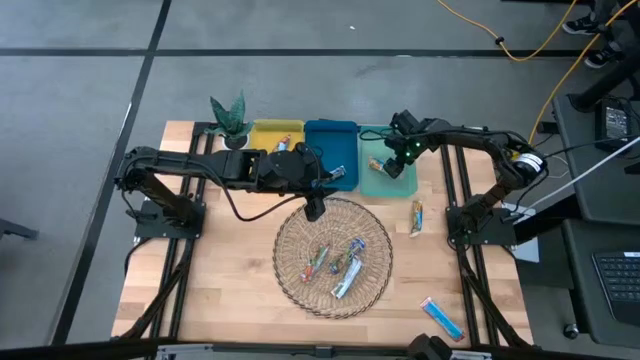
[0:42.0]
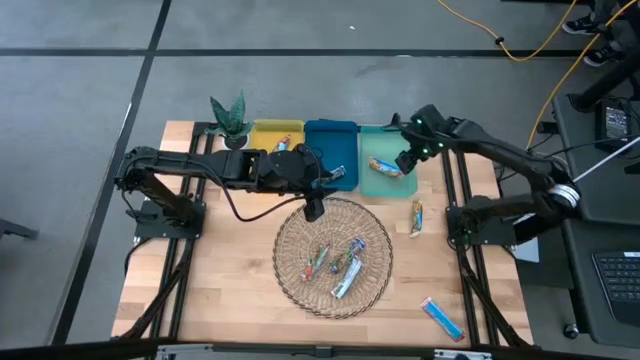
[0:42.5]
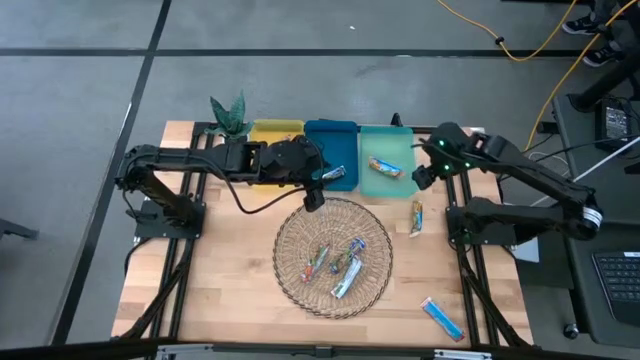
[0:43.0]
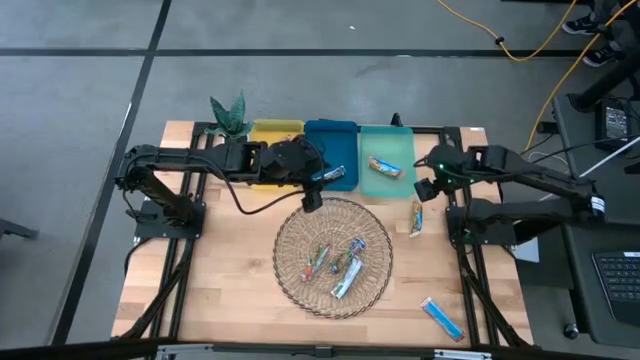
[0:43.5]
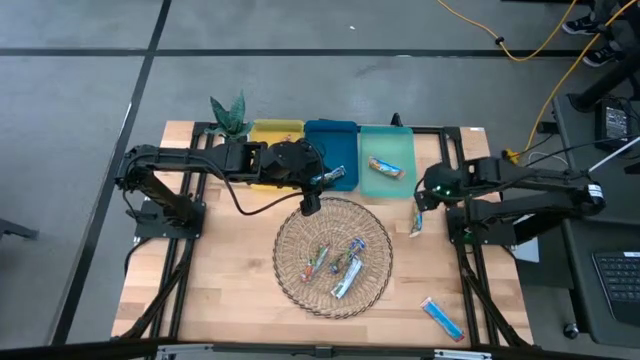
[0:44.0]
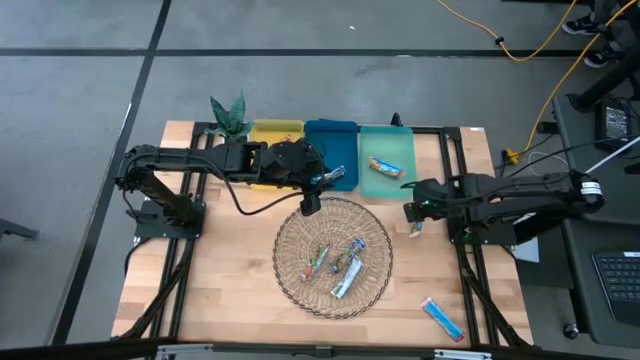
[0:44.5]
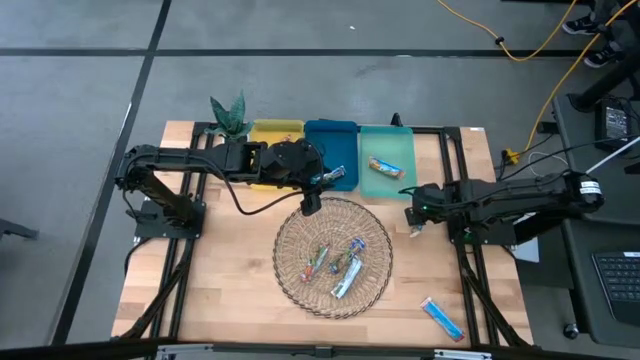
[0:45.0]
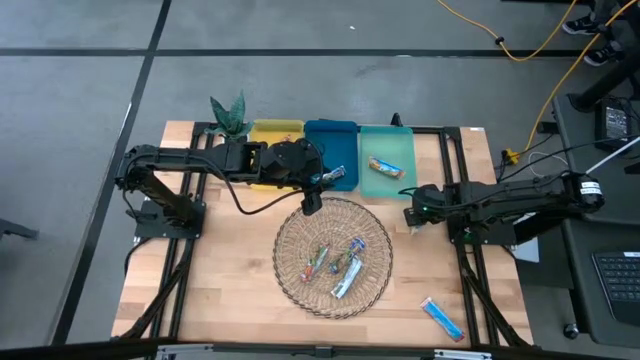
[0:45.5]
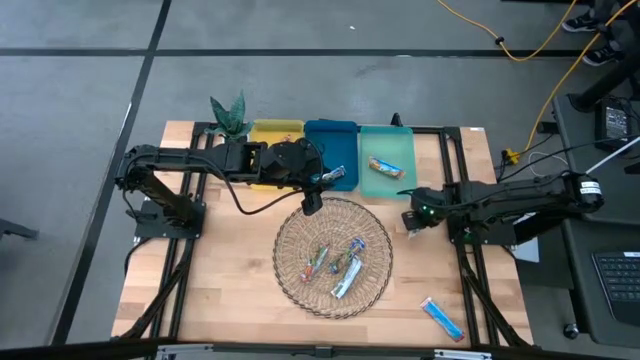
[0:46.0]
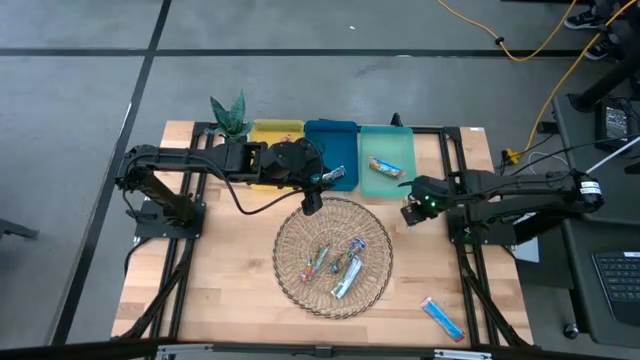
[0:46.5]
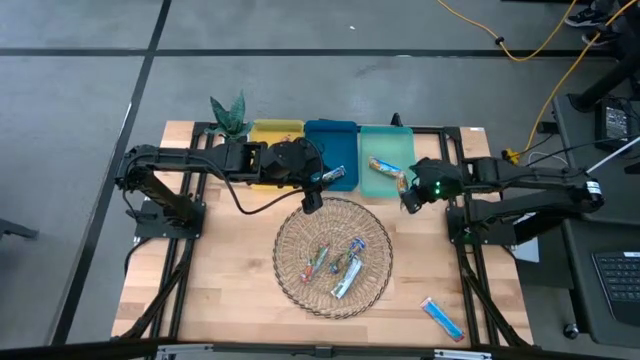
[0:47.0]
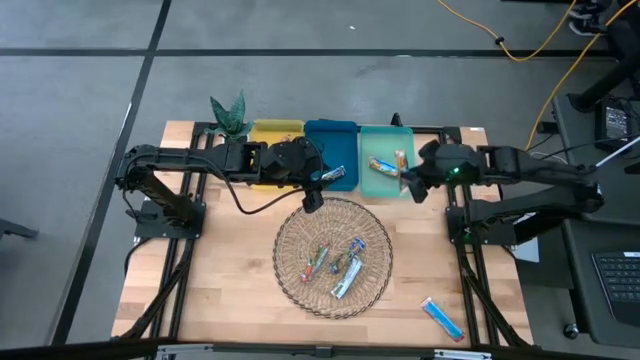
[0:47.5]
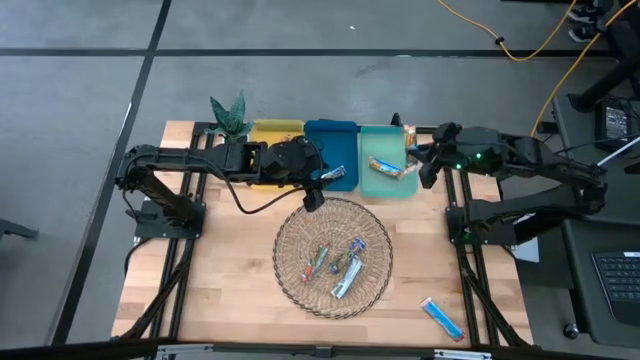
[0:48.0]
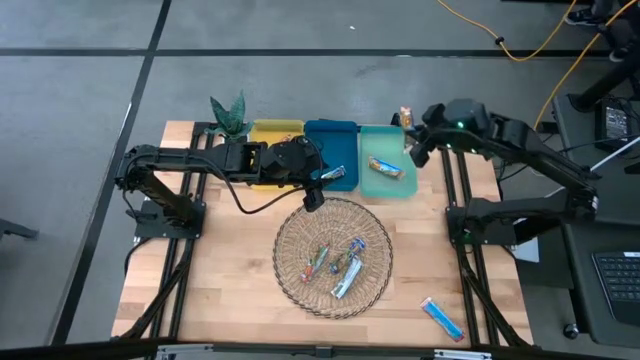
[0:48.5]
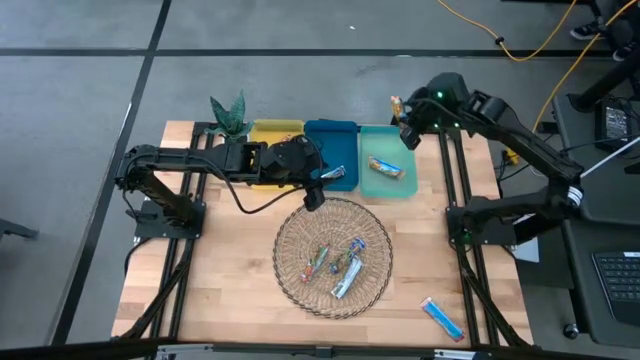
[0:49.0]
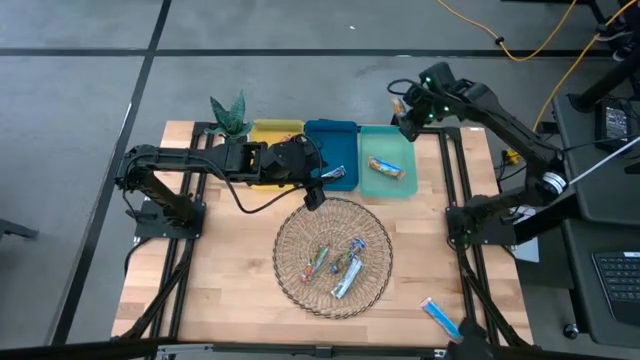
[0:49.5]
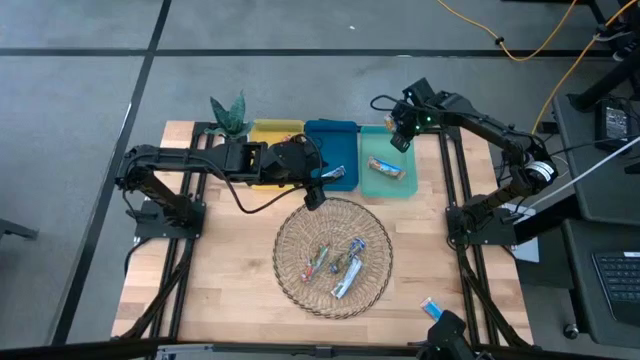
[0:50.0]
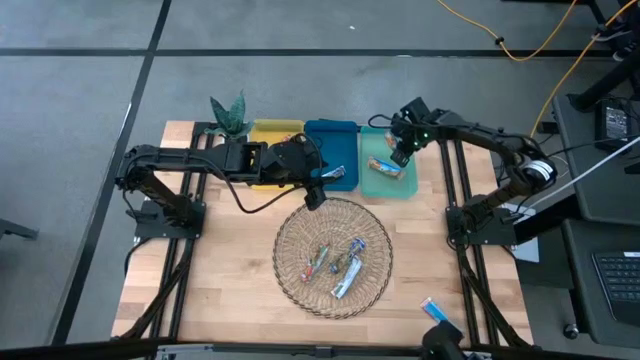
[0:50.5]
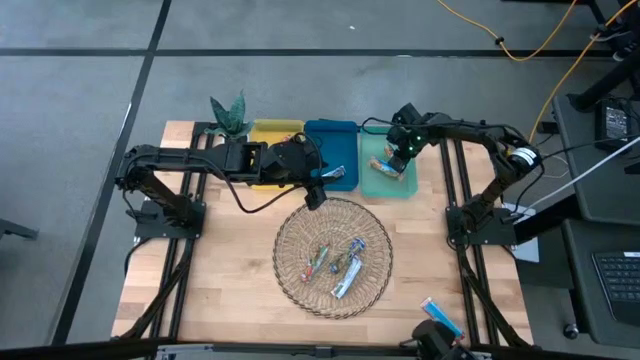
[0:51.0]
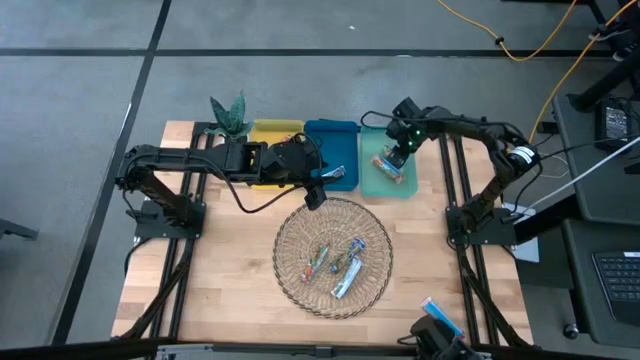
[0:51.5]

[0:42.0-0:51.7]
Task: Pick and place Granola Bars by type
Put the orange granola bar into the green bin

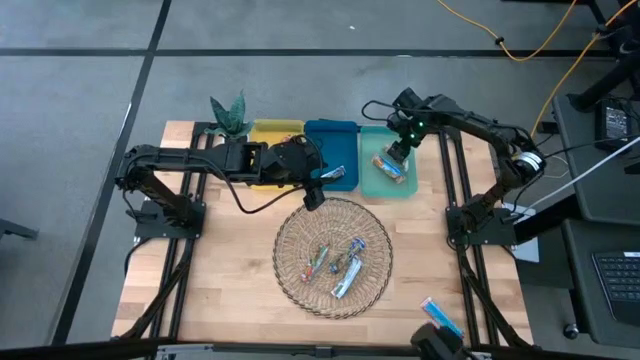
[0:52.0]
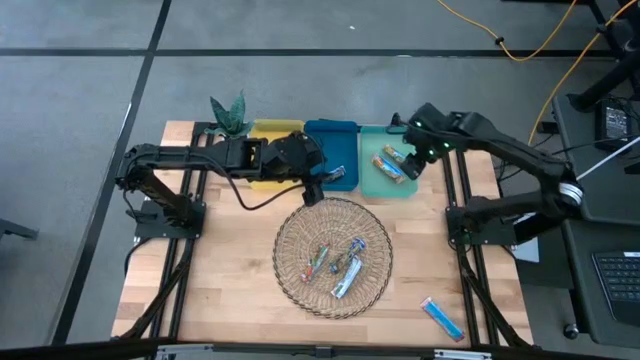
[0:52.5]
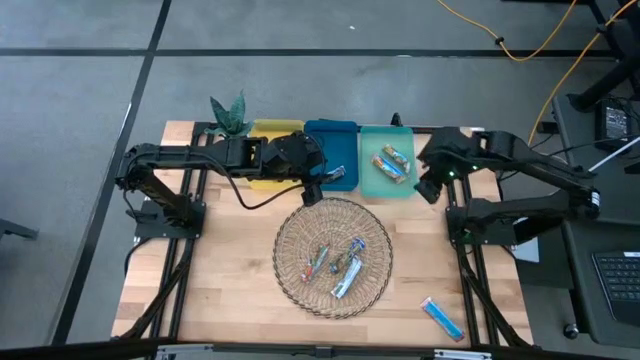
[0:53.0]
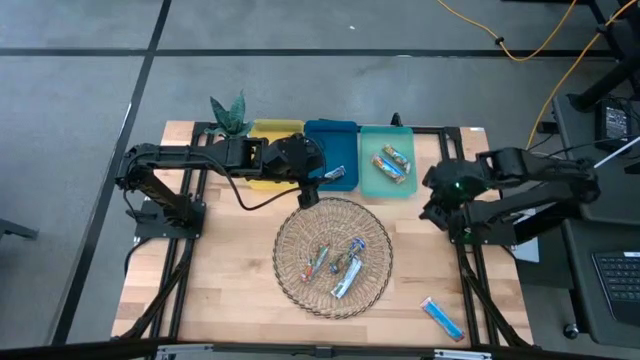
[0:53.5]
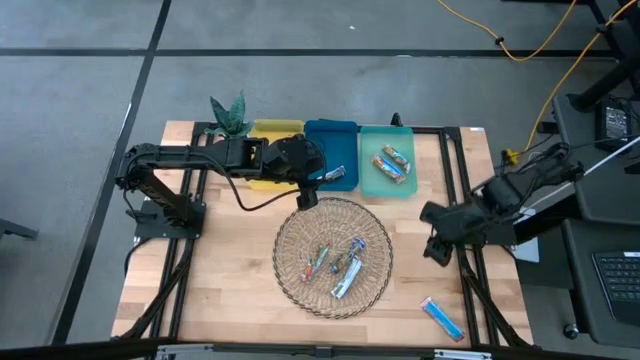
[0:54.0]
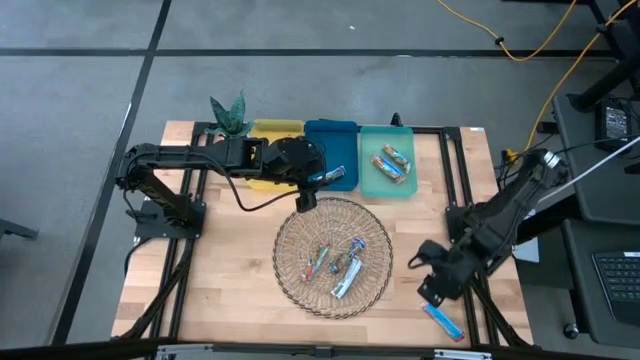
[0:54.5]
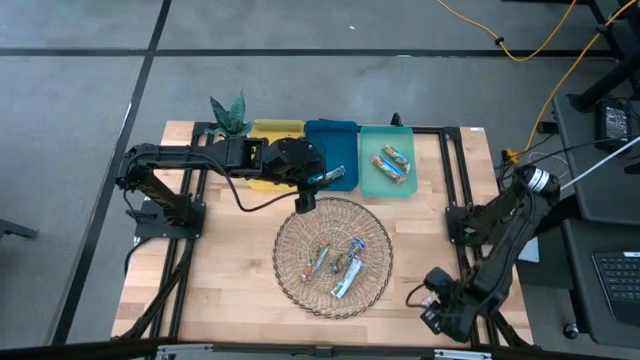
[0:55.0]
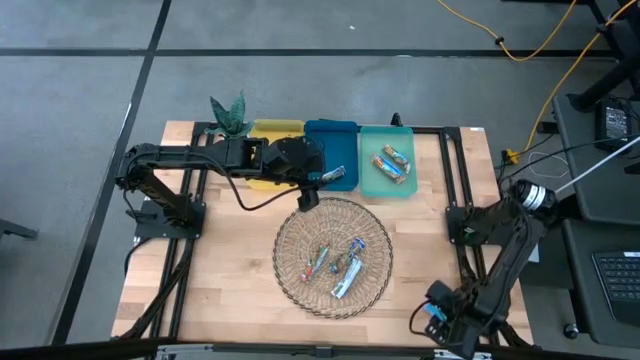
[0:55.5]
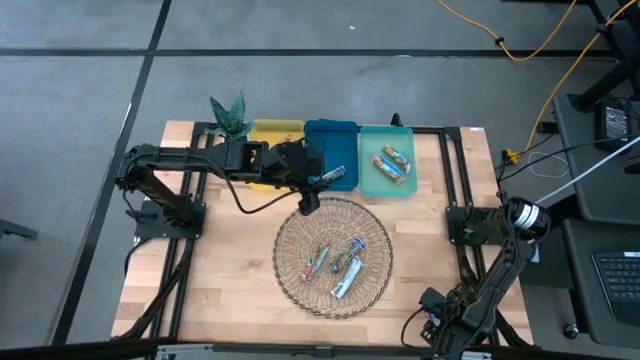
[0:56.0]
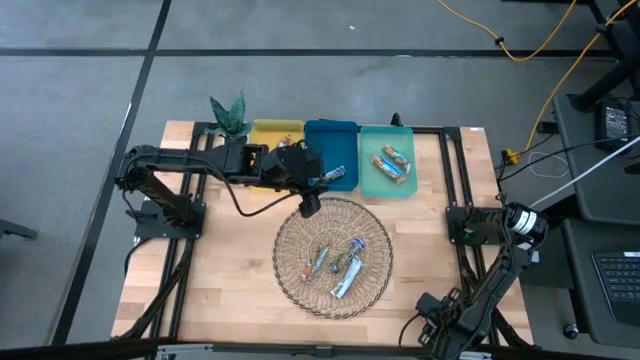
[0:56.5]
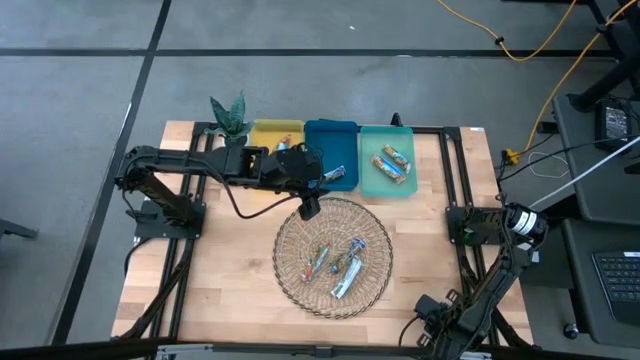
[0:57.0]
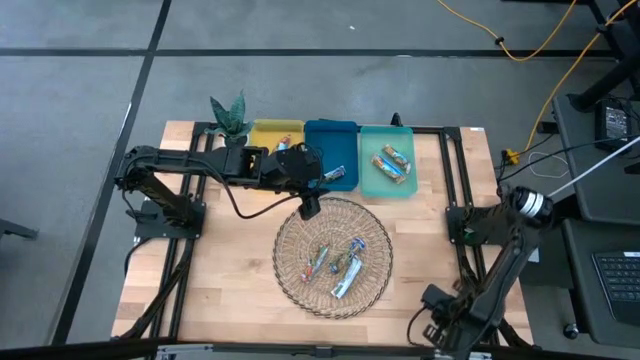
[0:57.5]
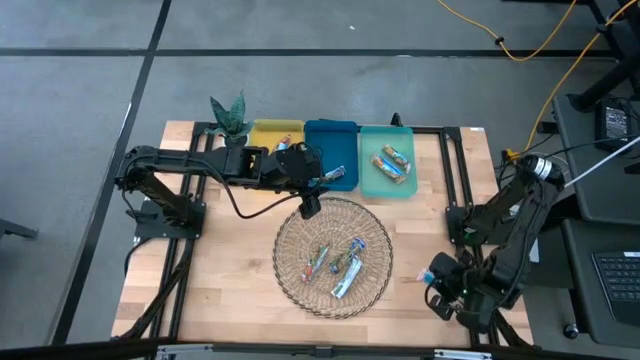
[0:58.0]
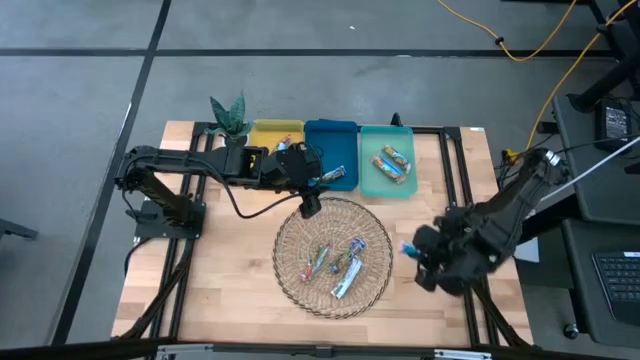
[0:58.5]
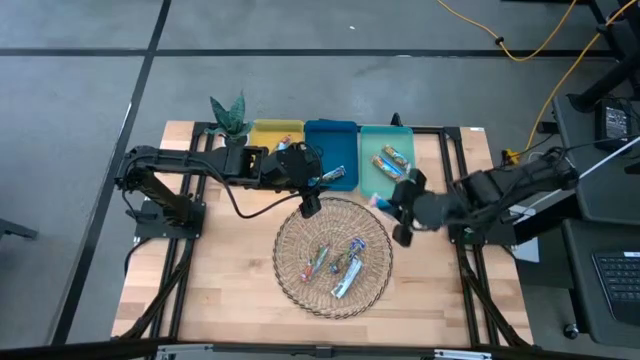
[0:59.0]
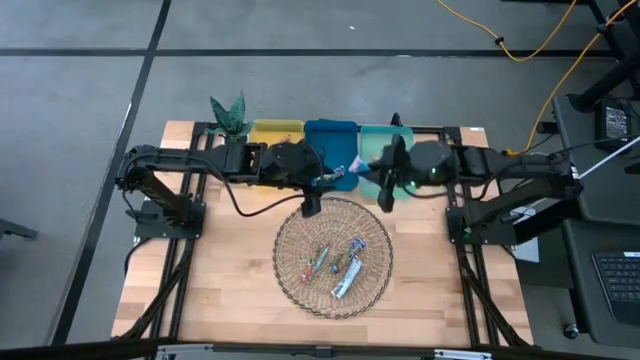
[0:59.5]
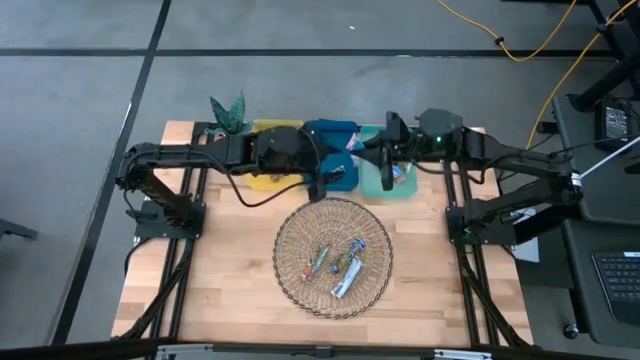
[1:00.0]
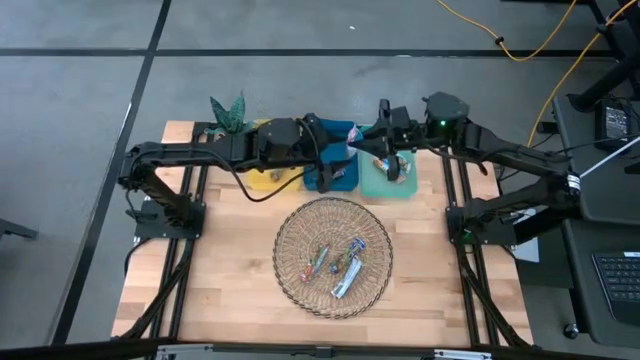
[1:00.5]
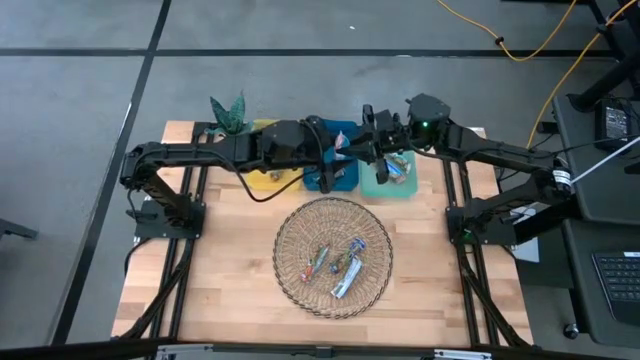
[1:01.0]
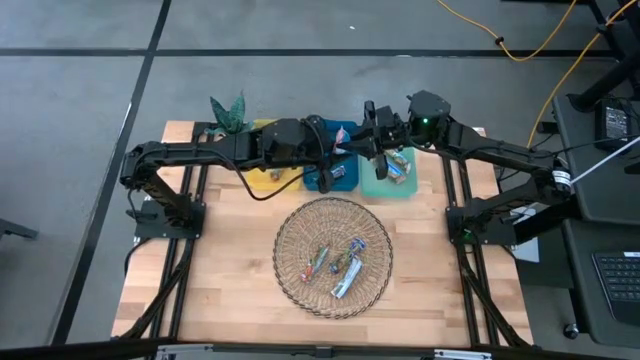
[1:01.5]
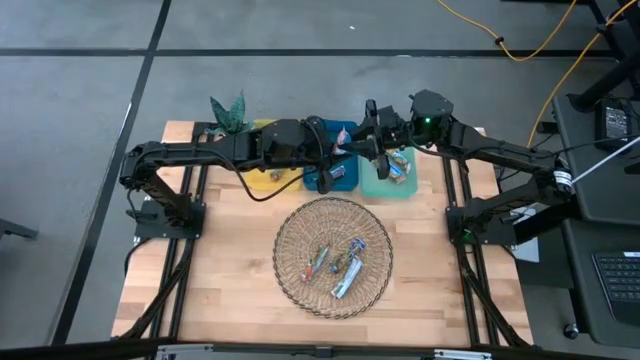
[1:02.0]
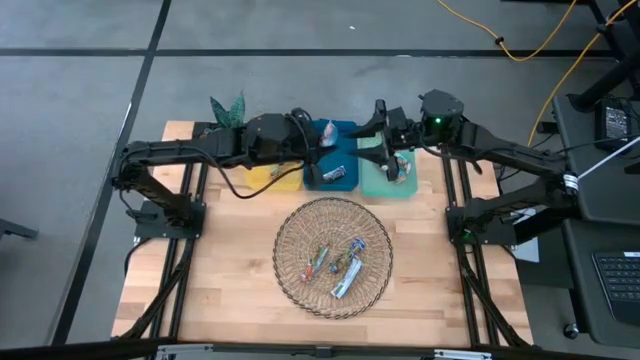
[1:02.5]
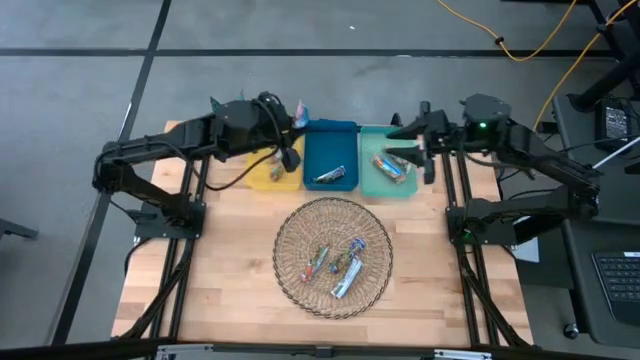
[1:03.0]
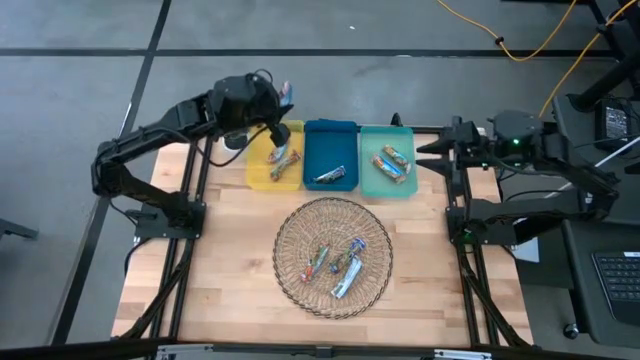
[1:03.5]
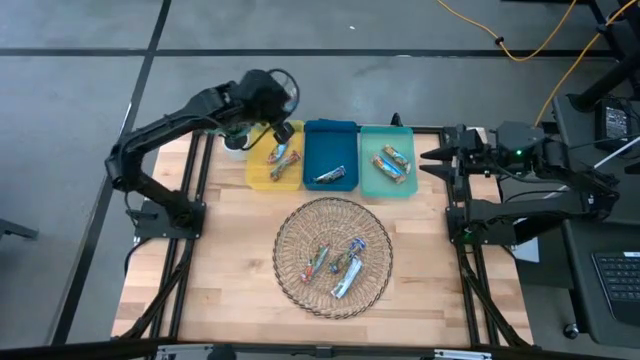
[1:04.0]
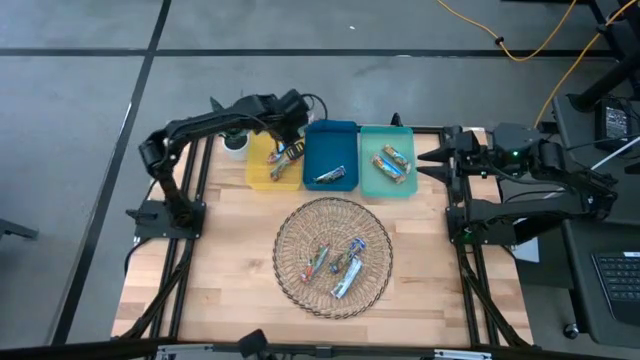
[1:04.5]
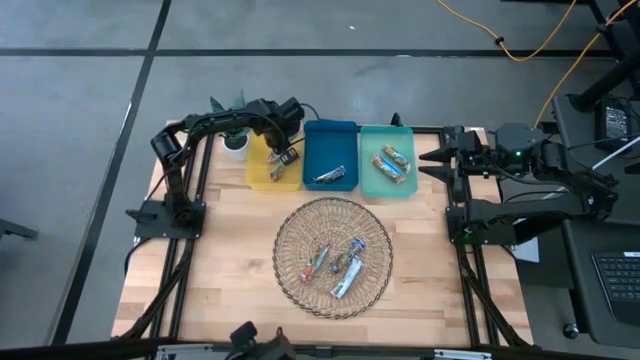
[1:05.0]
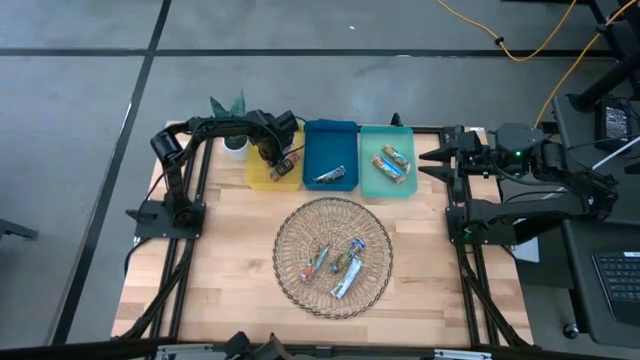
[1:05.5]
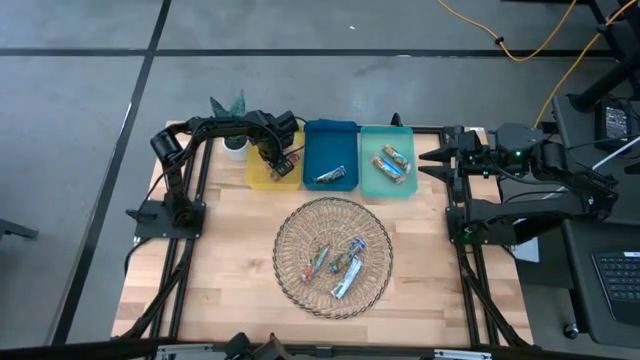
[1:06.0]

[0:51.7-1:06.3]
Put the red granola bar into the yellow bin
